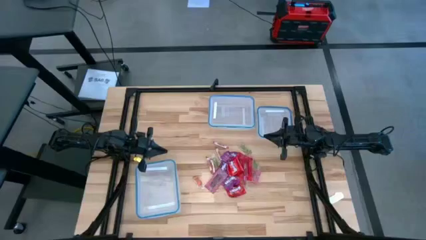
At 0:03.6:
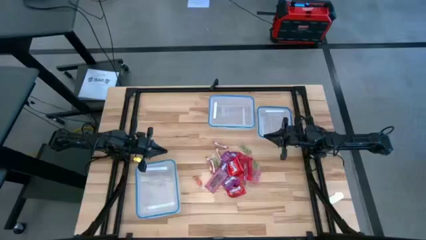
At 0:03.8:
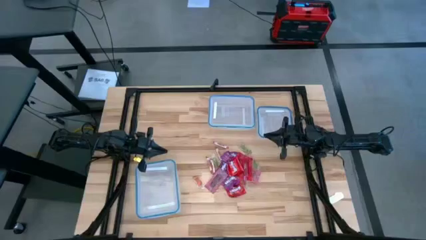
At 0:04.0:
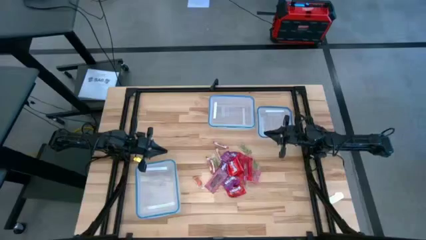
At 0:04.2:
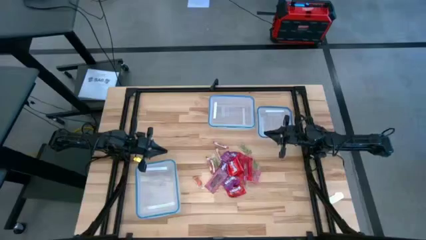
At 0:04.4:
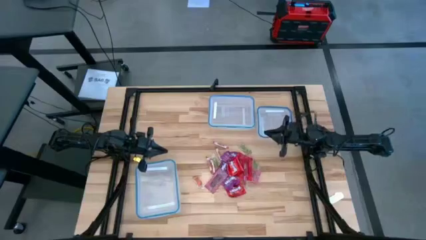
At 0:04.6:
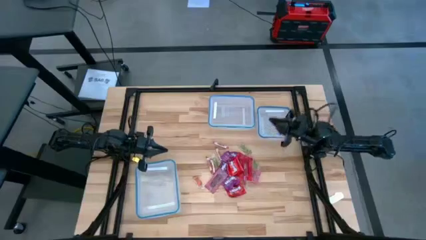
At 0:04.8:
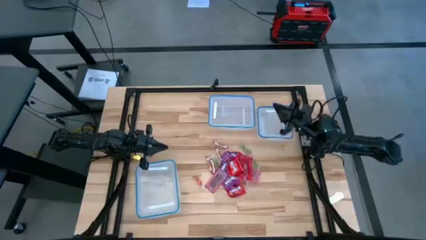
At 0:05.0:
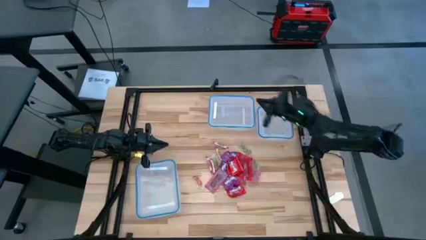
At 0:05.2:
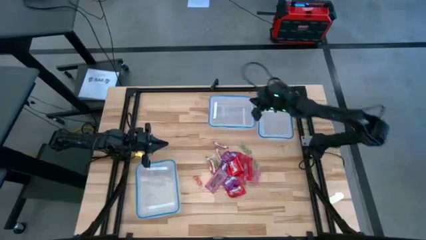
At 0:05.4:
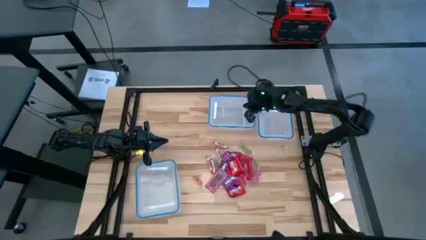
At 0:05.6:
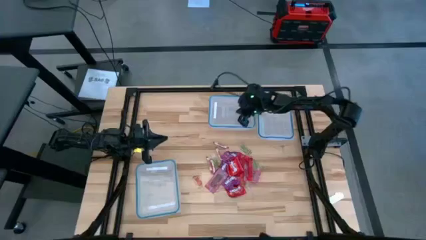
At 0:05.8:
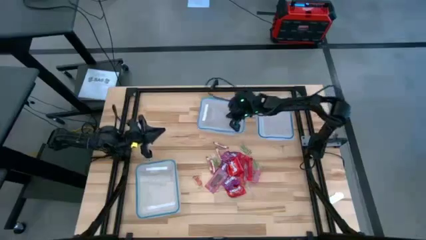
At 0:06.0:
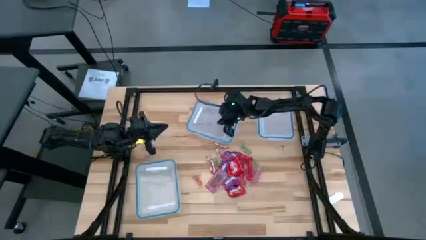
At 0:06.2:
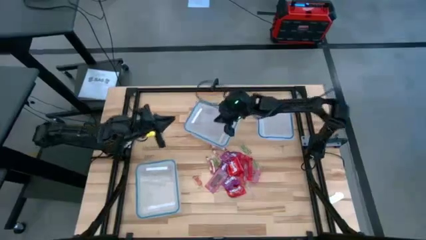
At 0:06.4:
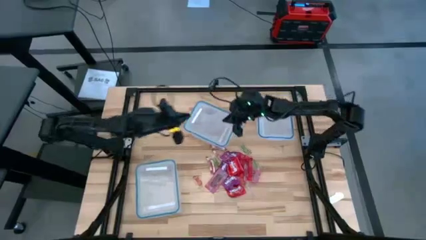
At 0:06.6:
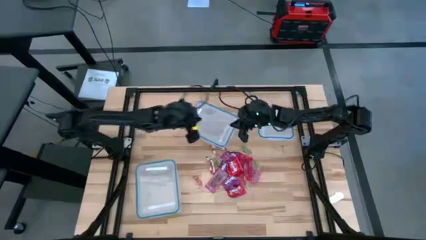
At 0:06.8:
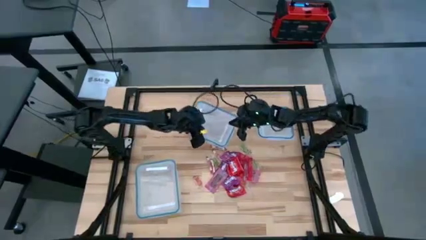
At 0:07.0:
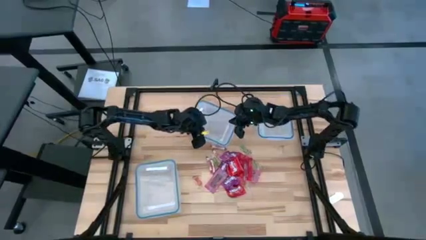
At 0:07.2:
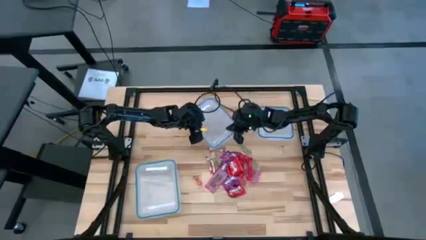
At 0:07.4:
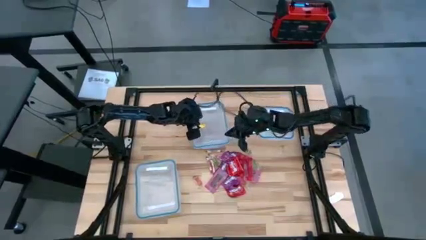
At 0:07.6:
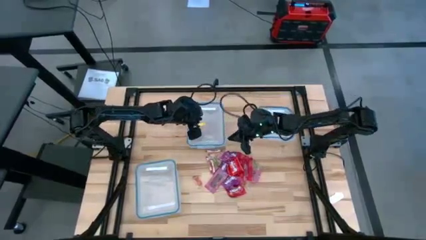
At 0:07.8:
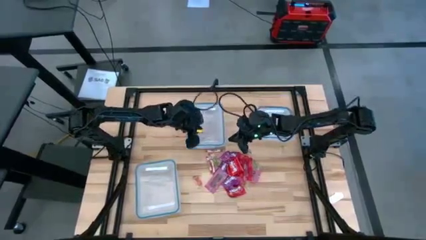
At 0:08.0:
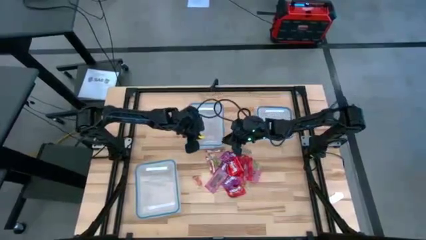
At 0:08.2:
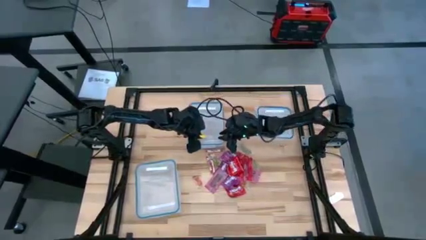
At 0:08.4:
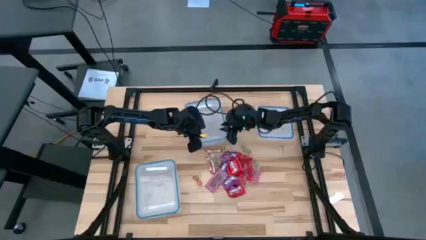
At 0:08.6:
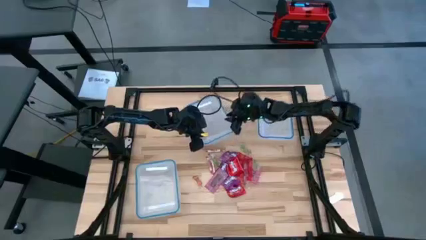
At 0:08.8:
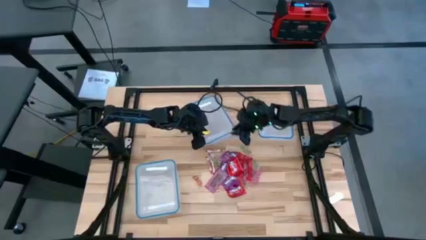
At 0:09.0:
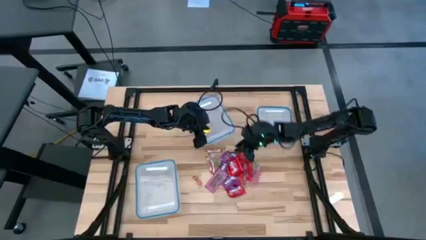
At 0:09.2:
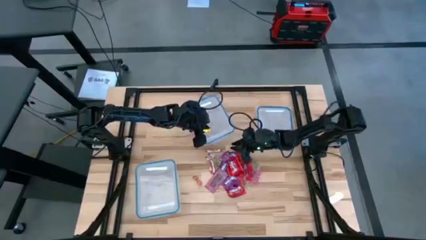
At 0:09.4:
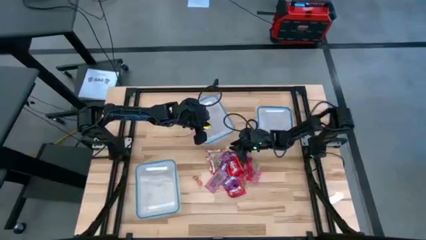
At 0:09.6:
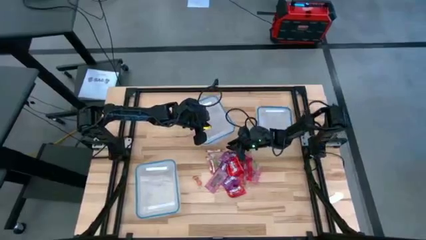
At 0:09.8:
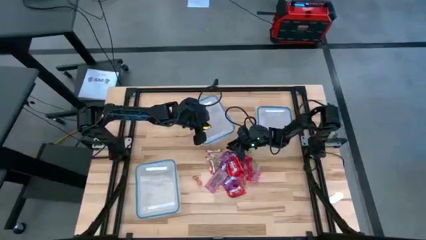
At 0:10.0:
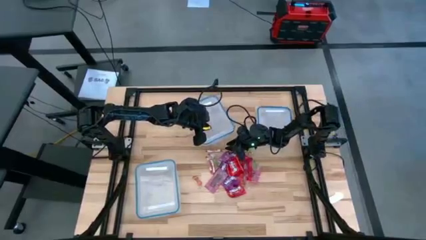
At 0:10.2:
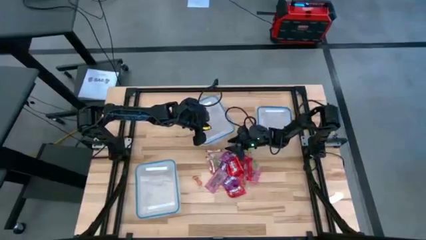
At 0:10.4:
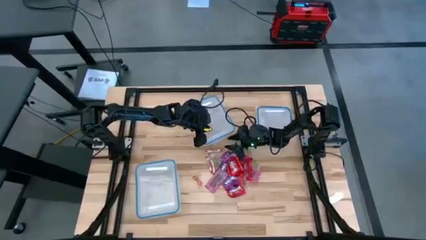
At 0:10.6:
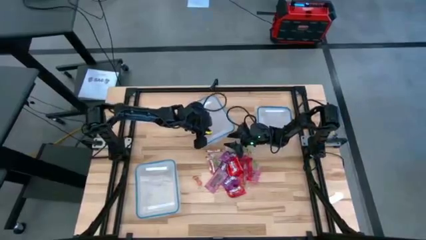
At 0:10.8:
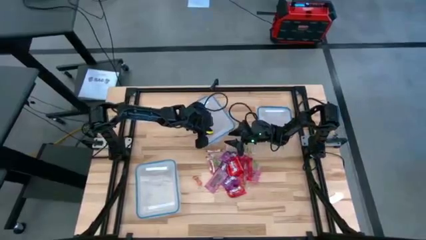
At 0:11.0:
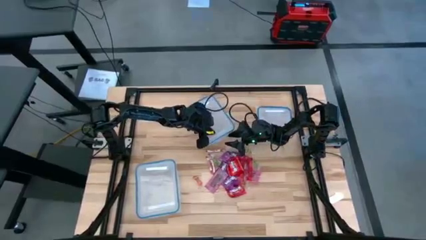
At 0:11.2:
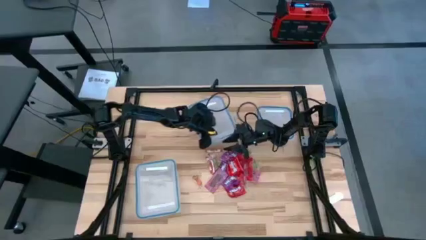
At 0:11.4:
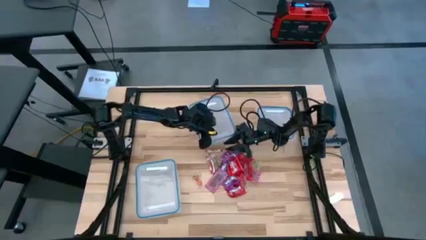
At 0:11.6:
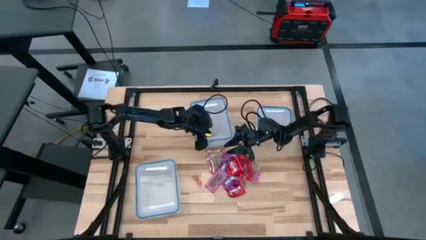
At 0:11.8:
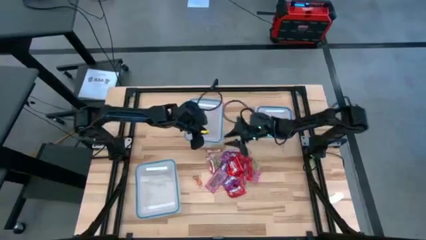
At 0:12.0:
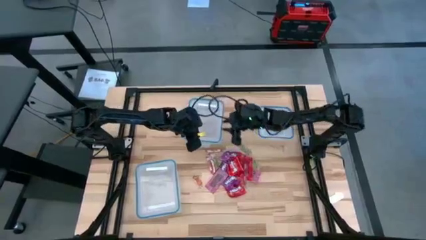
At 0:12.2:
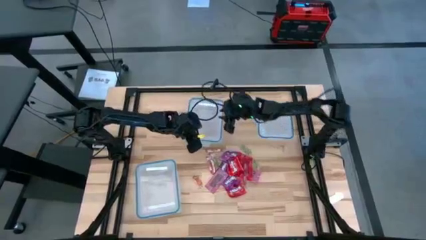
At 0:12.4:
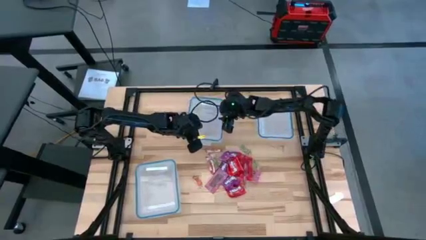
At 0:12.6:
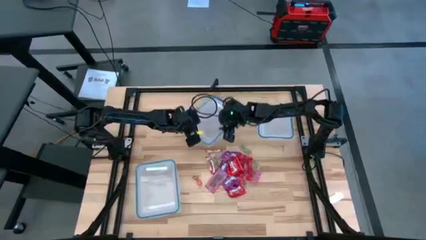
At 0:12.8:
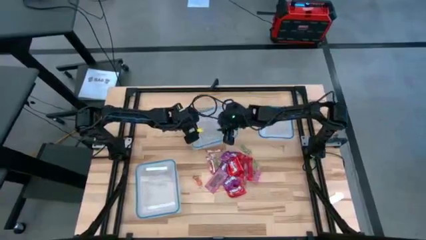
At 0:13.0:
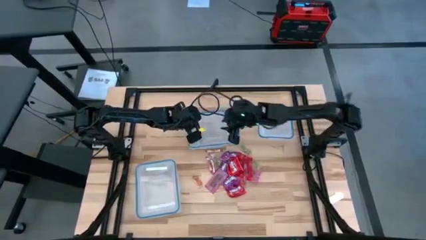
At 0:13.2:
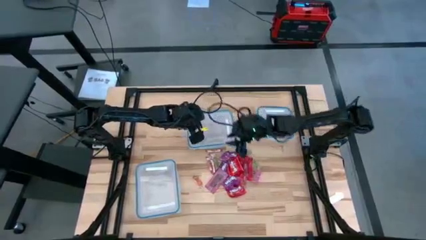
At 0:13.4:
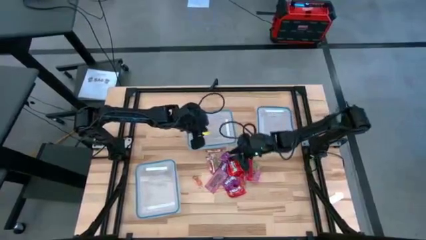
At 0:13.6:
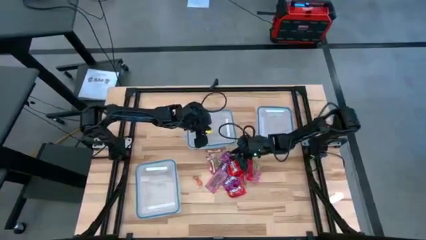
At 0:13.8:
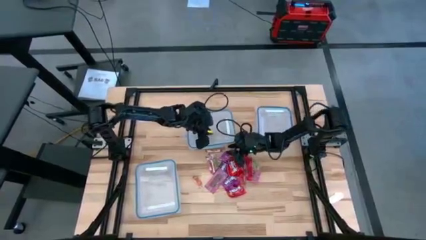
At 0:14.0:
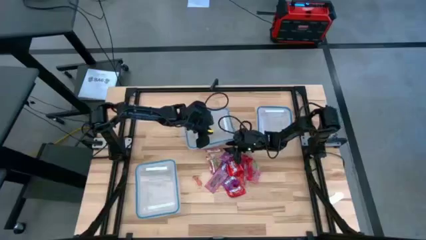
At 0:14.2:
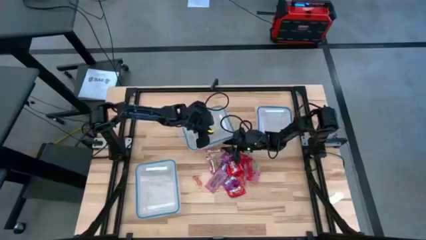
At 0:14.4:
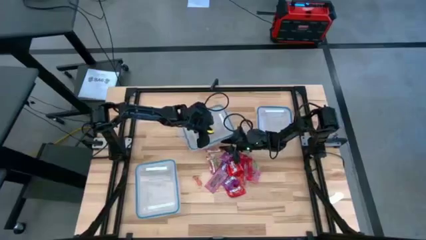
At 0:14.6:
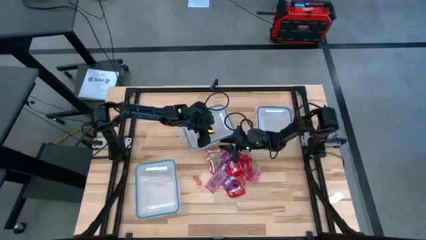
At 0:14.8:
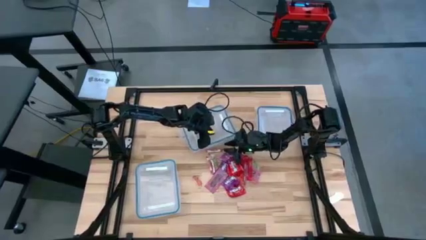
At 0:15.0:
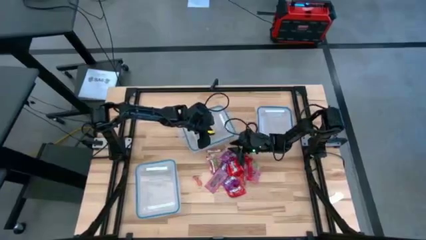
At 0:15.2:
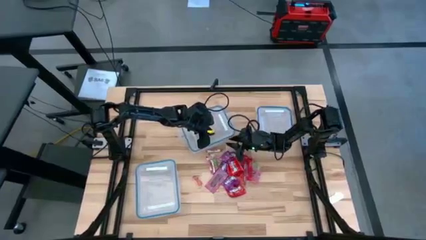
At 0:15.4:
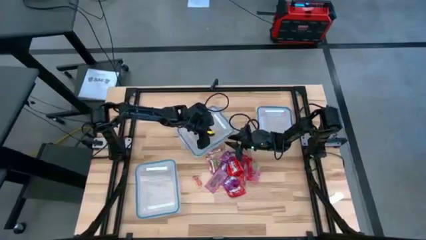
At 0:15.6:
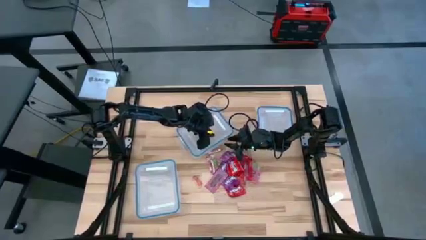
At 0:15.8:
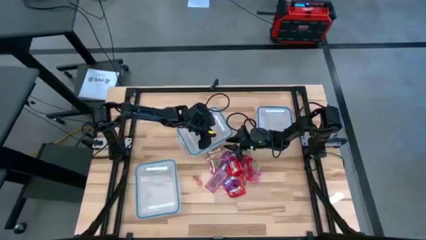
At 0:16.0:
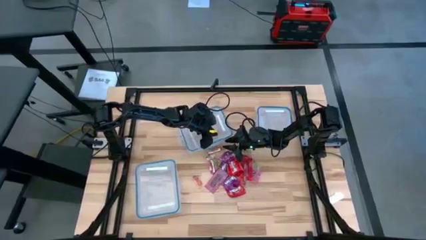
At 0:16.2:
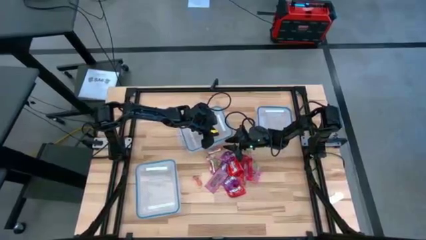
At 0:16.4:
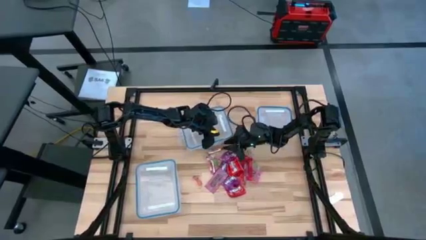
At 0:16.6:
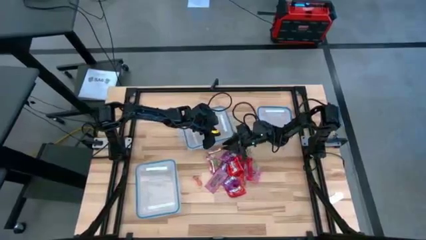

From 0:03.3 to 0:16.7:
Task: Sort candy
Open the top left transparent bin
